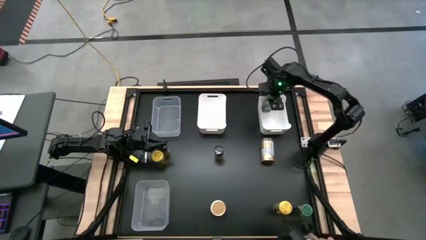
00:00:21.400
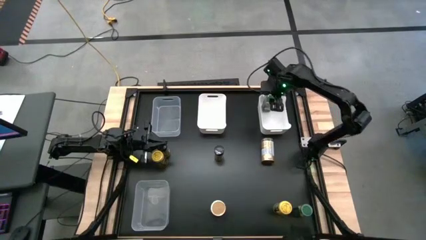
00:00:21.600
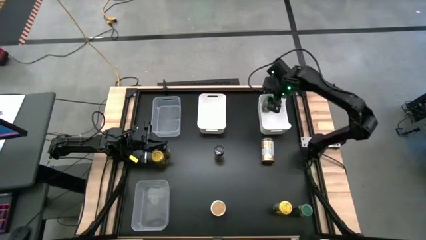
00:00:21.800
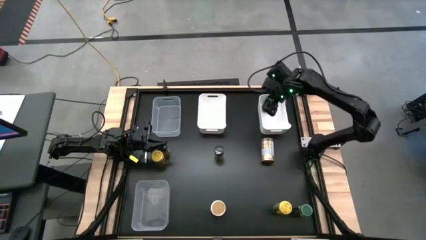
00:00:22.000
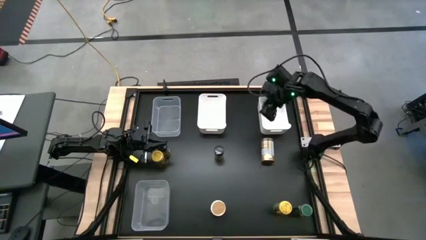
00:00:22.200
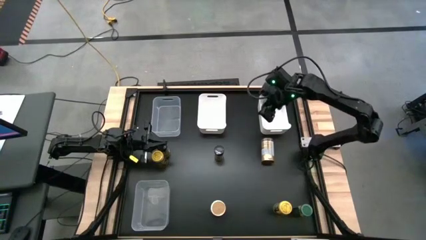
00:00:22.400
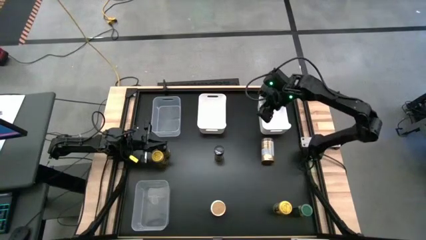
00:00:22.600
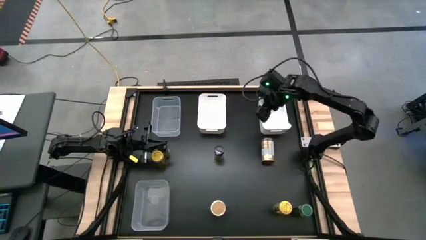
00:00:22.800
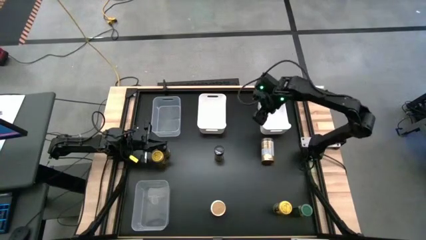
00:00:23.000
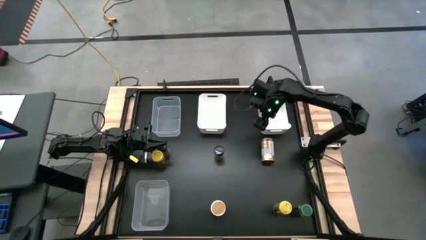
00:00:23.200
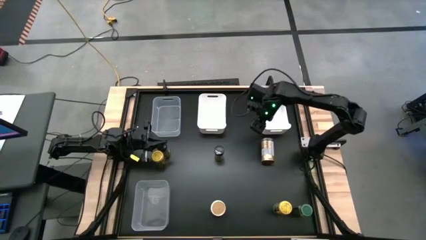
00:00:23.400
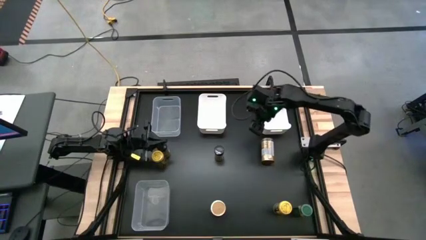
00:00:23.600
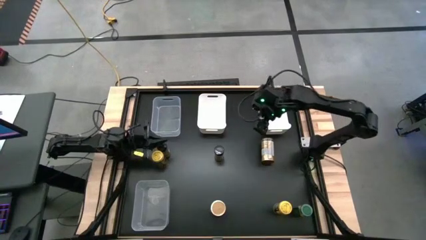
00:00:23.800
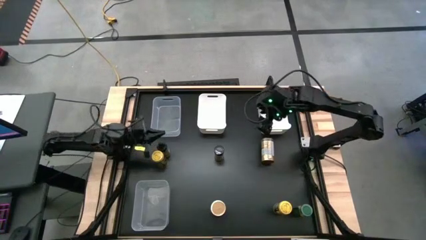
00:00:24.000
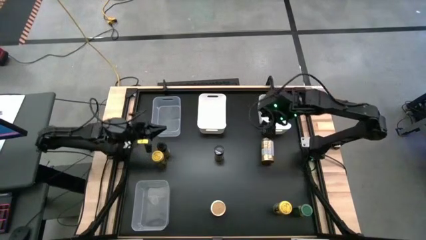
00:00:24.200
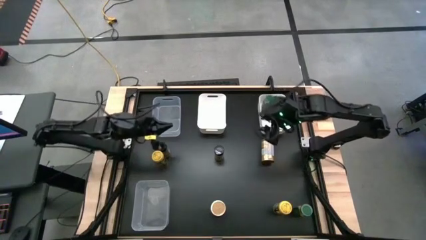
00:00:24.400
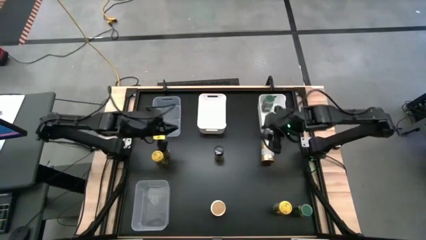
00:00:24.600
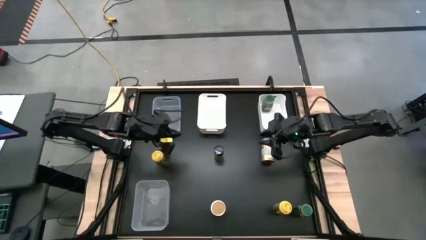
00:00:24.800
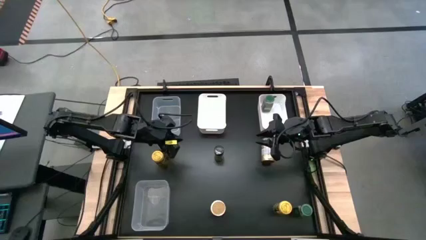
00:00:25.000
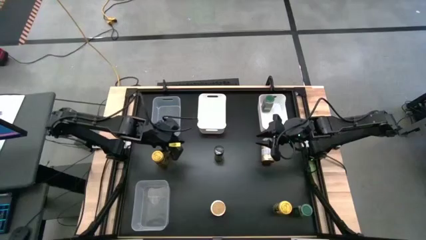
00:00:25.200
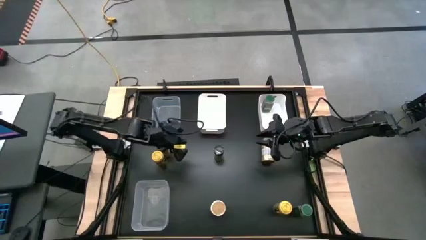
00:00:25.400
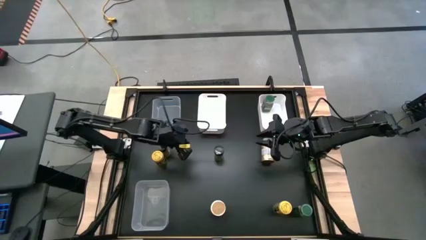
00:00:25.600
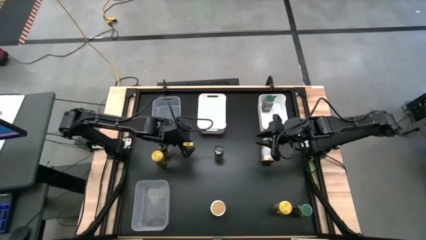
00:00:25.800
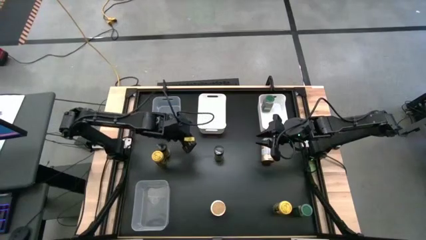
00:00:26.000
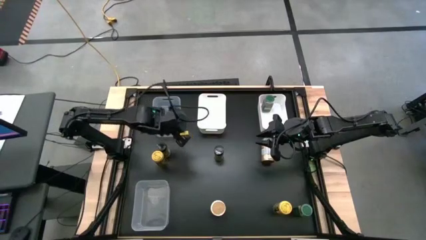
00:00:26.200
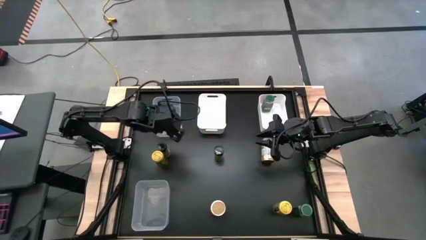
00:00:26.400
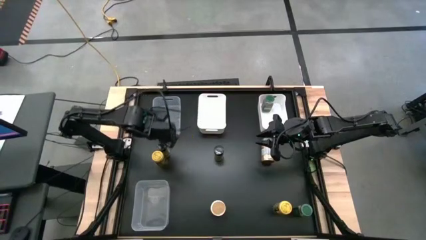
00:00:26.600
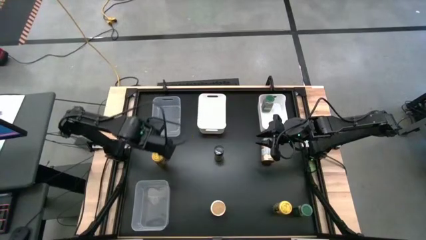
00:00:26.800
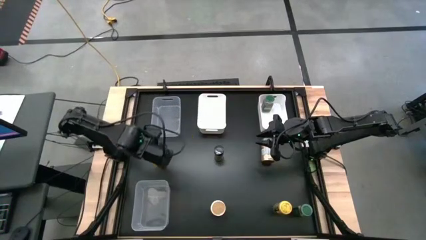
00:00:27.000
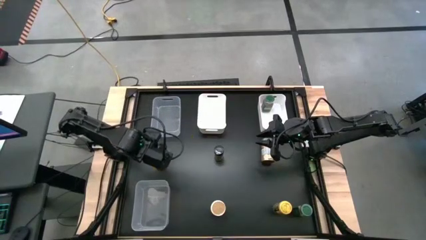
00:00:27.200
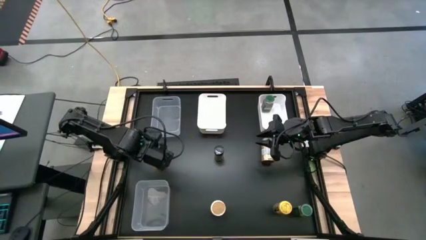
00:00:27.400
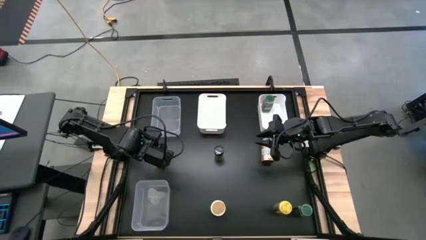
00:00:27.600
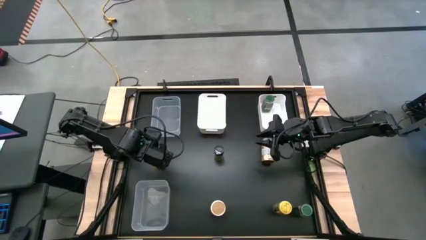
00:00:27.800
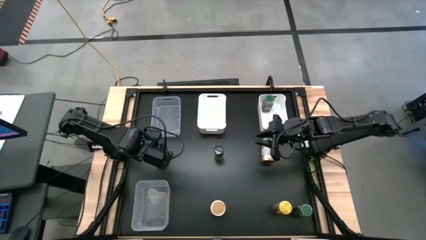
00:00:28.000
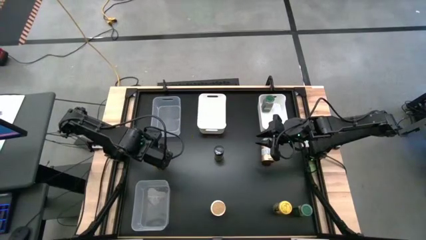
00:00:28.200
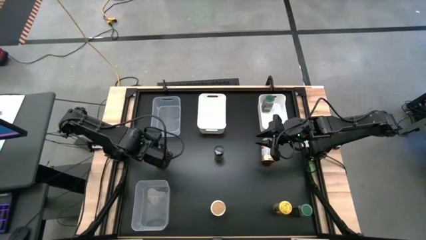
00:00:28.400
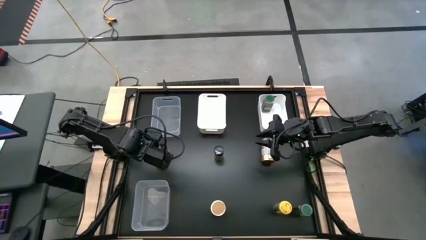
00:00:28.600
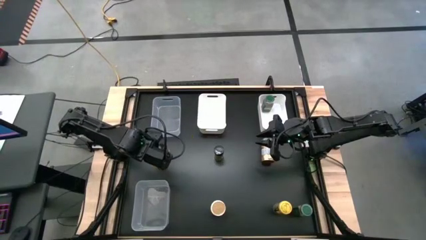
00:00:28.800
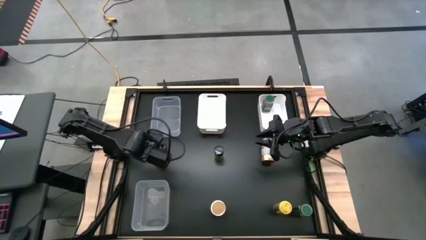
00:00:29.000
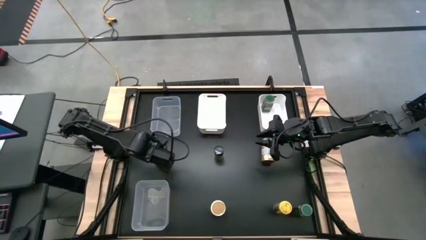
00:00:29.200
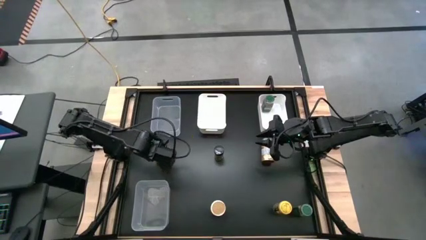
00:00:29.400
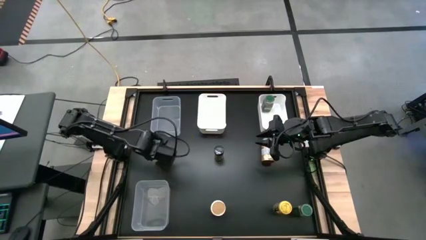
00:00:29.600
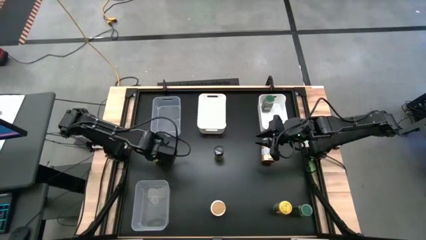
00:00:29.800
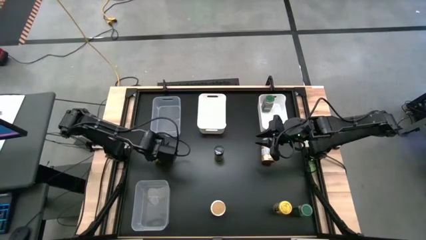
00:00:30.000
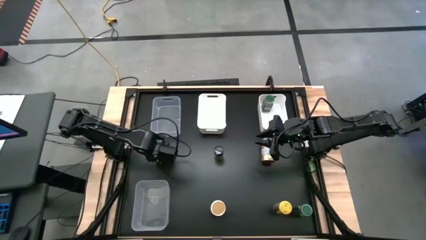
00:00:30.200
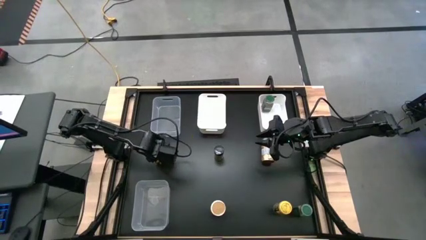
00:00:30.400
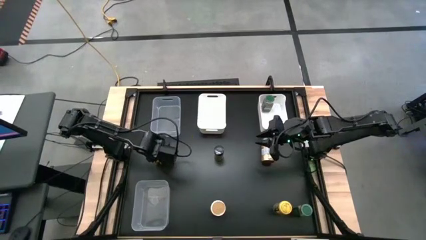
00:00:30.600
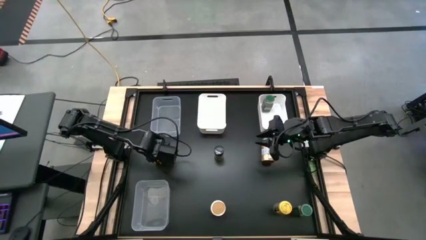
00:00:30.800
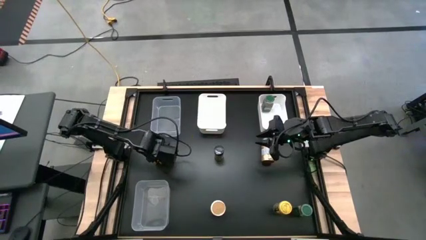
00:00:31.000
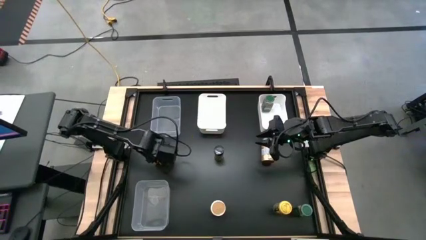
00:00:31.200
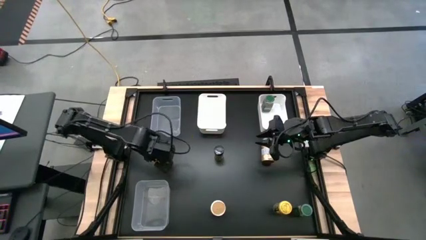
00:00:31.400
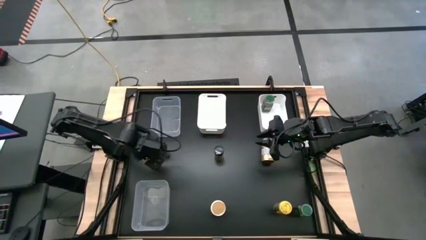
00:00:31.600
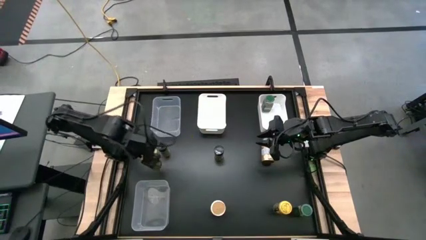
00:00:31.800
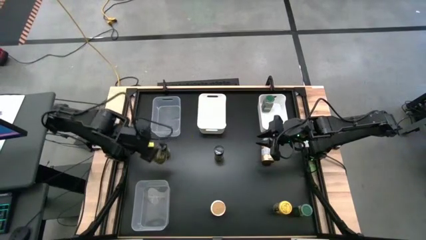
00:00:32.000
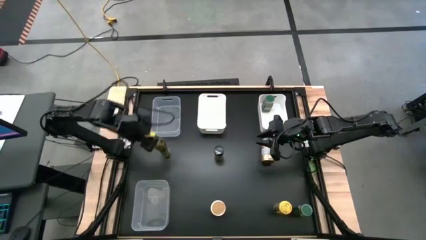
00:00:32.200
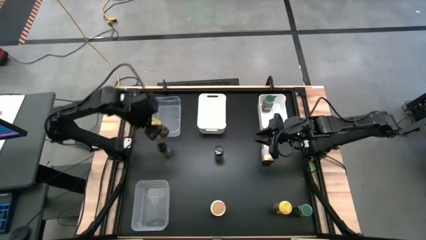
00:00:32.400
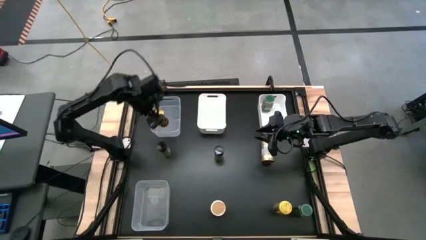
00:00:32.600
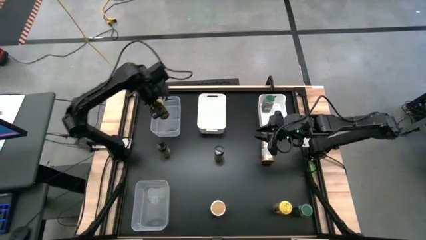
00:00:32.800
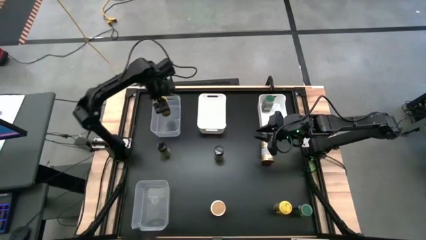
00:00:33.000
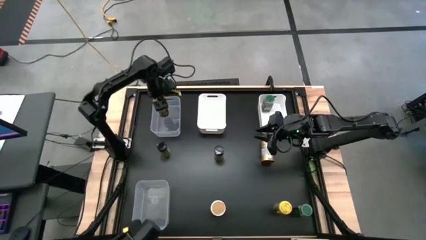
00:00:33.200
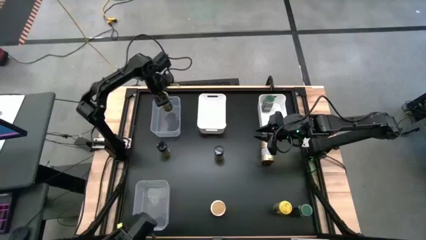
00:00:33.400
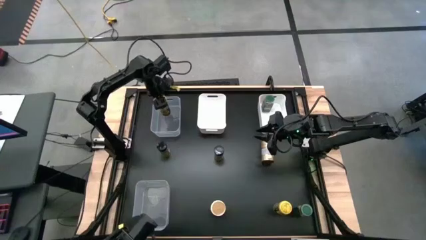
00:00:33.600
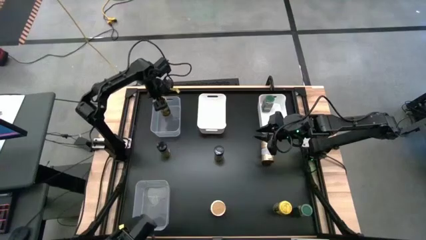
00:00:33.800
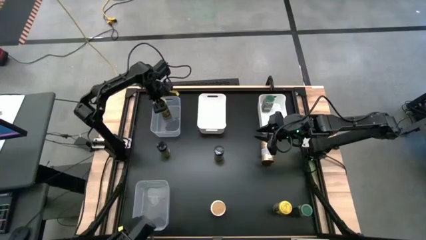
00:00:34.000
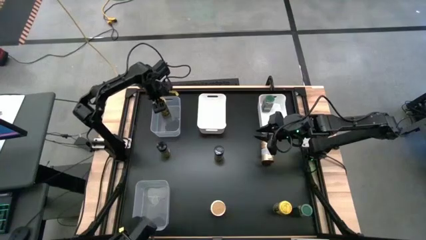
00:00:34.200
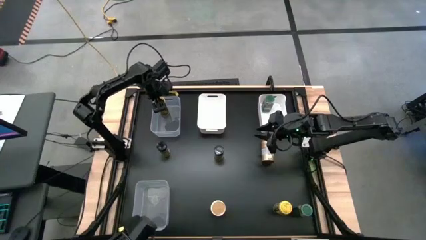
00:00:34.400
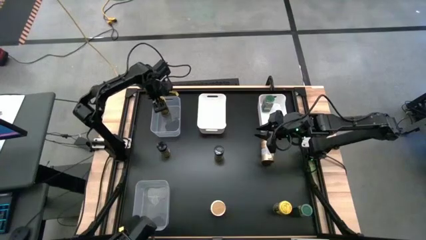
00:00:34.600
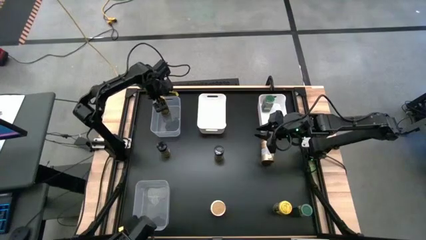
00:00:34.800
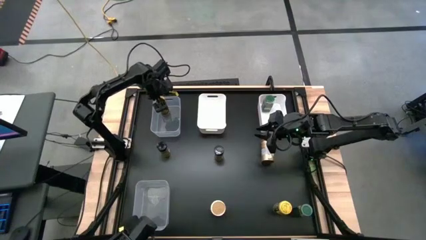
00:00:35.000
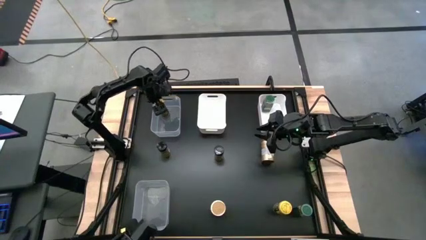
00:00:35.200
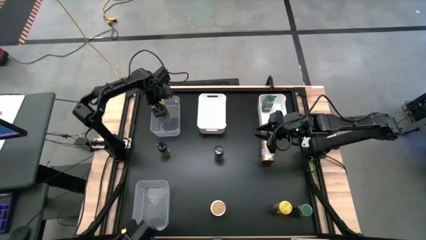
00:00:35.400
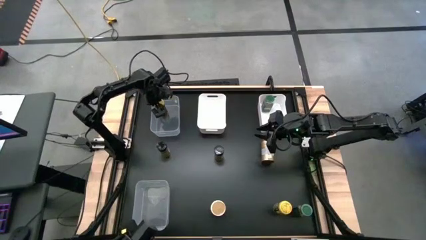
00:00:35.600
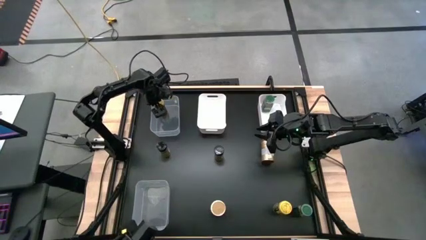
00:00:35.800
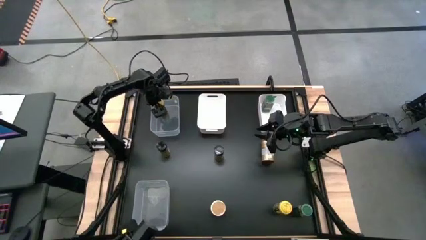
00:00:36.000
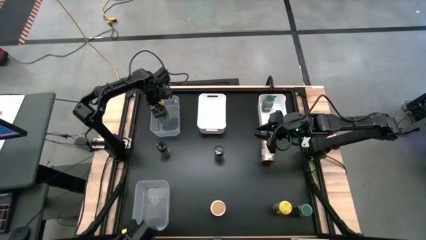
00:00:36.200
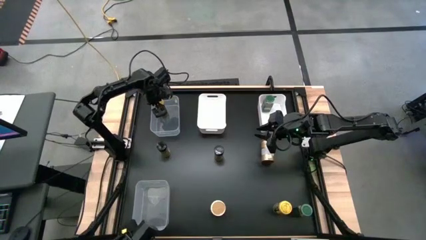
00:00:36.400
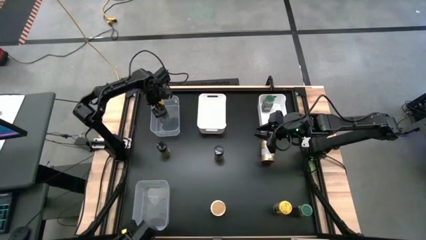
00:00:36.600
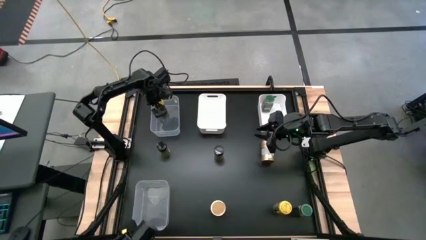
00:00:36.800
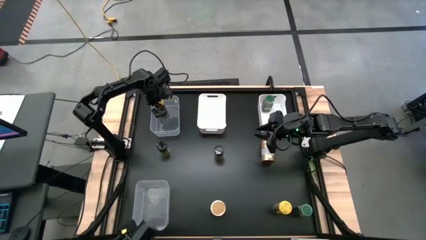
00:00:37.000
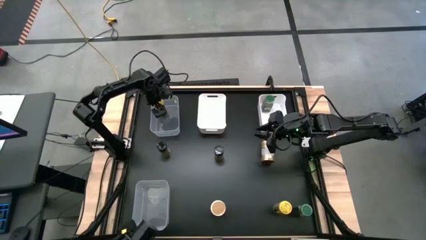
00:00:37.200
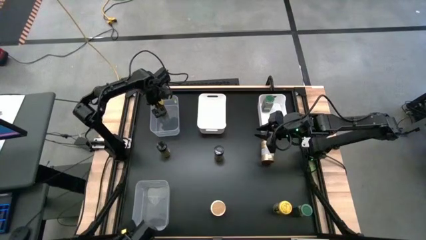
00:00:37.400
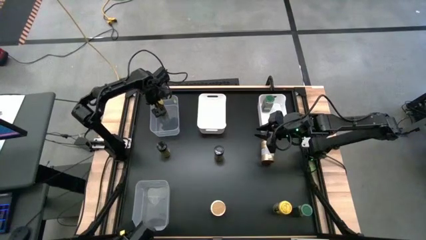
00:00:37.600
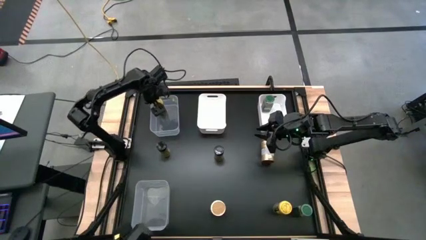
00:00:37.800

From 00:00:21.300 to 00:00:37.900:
Task: Sort spices by type
Put the top yellow spice bottle into the top transparent bin
